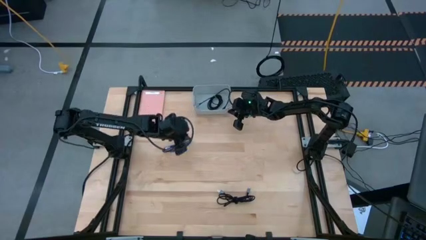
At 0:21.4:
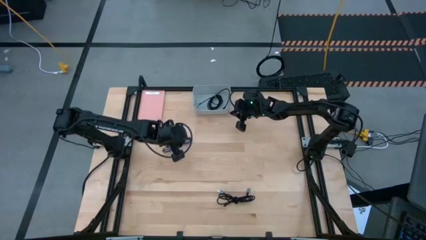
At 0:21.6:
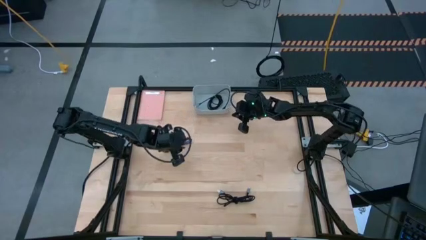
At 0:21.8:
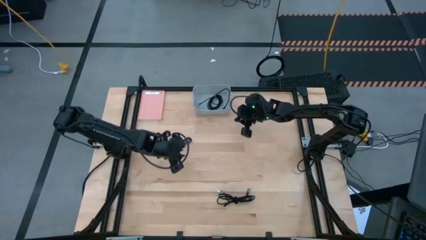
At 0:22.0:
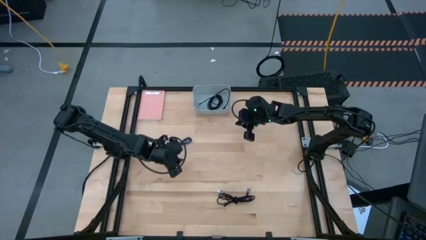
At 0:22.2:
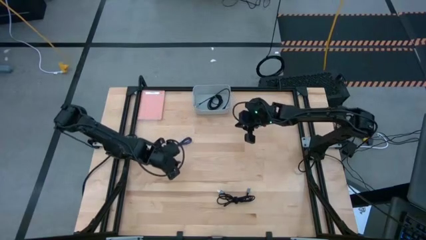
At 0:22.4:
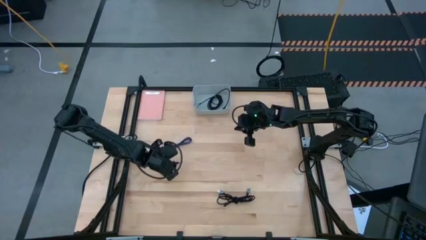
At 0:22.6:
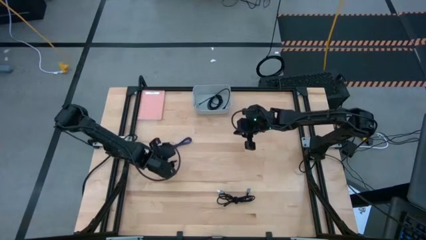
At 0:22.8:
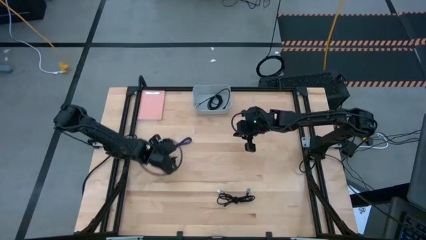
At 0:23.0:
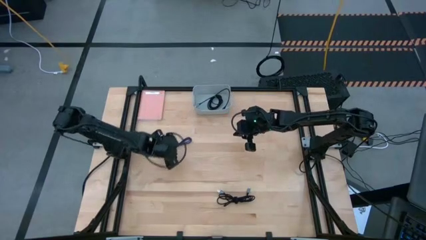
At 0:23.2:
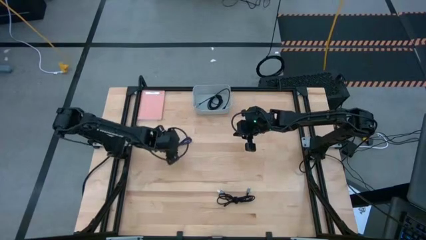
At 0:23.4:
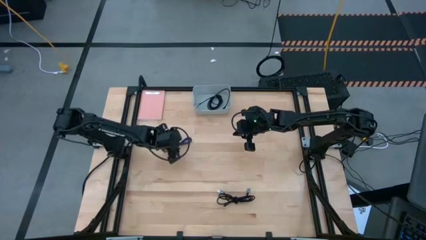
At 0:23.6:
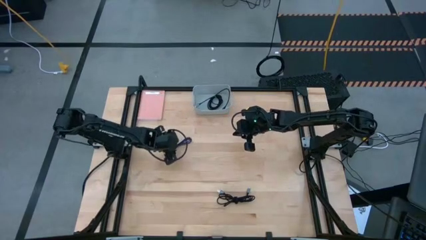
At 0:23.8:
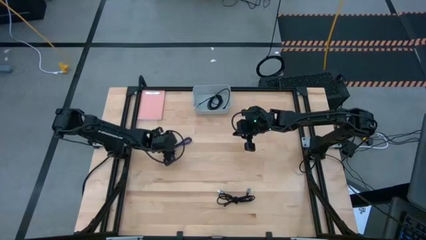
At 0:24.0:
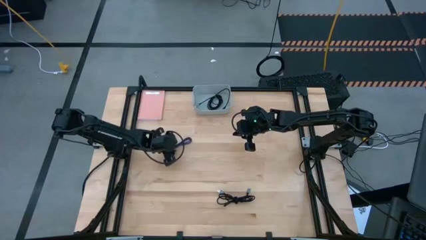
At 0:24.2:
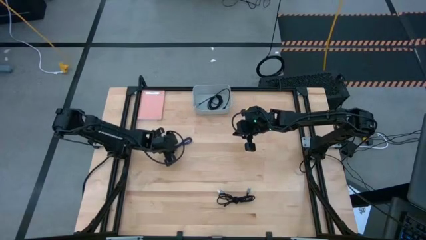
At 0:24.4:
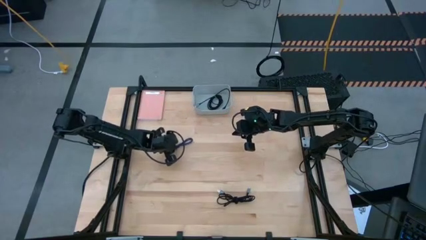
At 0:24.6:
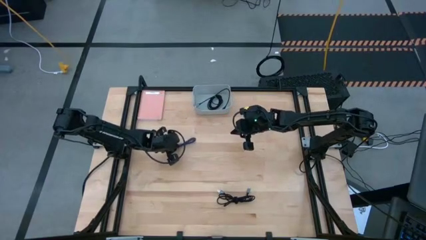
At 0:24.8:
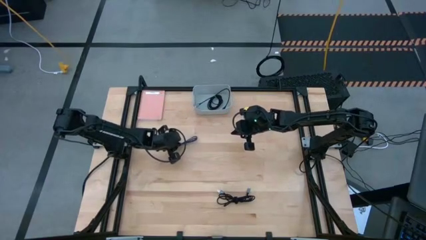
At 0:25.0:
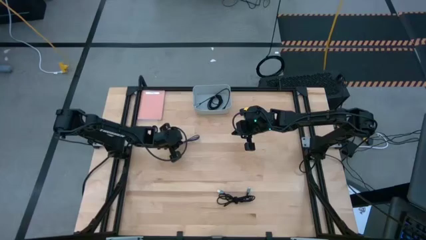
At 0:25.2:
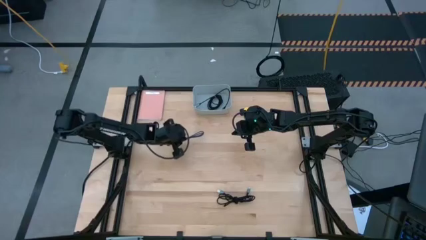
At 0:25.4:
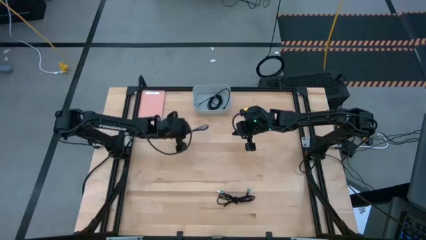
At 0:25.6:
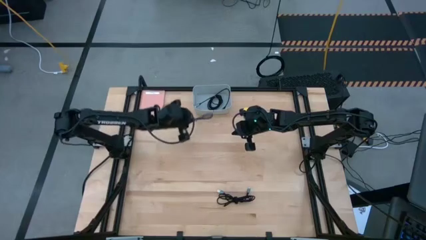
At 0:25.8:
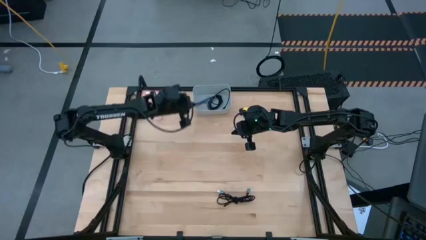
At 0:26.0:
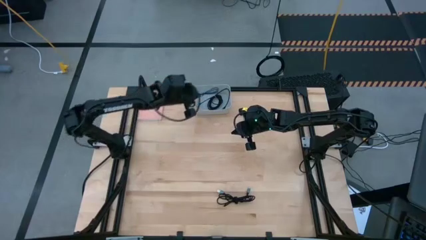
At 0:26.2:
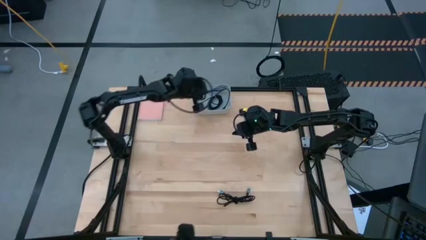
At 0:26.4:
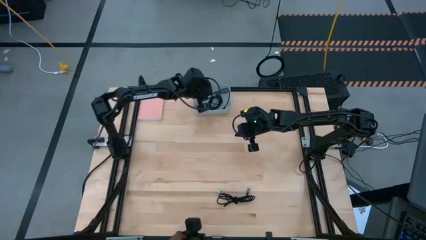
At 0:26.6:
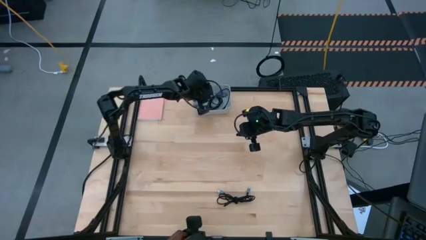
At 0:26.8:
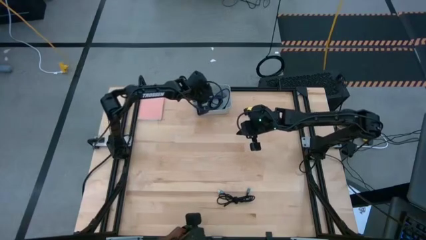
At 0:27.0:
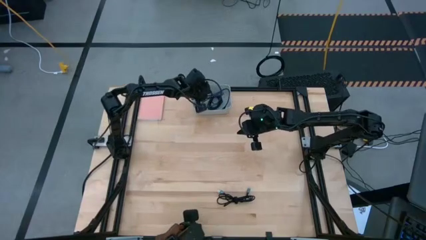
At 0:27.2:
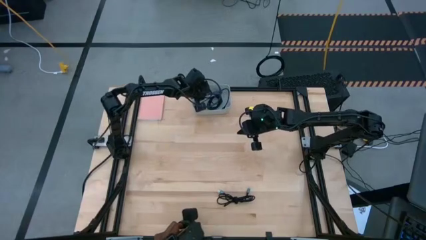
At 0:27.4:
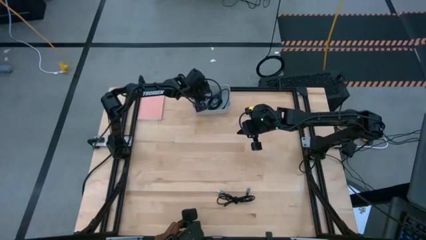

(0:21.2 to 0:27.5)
Task: Pick and place USB-C Cables
Put the purple charger cable into the gray bin

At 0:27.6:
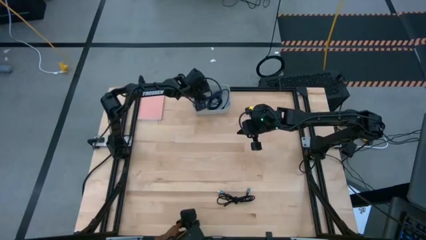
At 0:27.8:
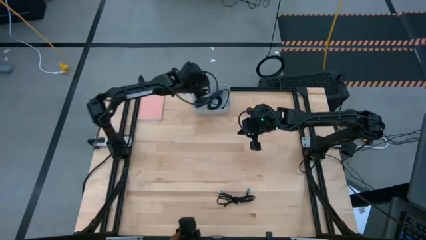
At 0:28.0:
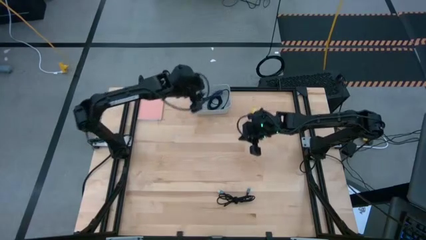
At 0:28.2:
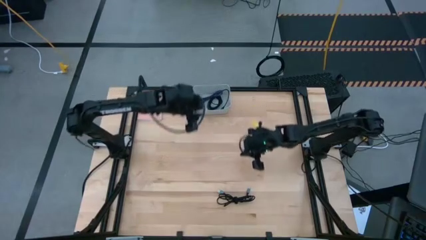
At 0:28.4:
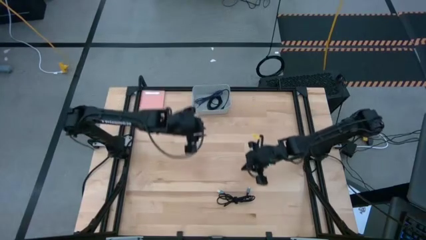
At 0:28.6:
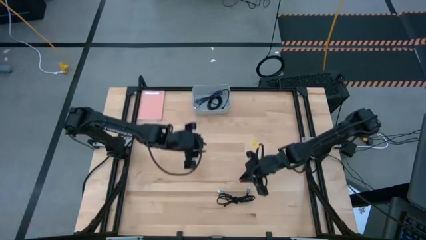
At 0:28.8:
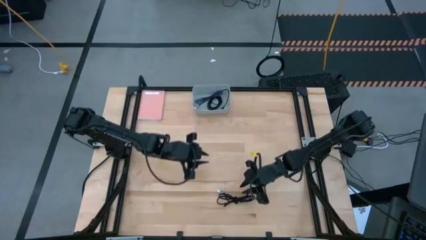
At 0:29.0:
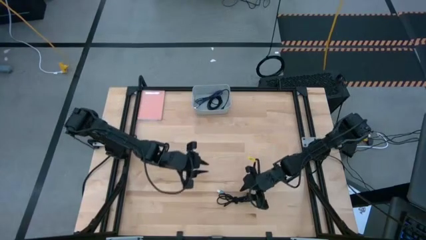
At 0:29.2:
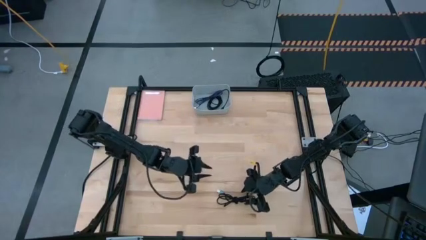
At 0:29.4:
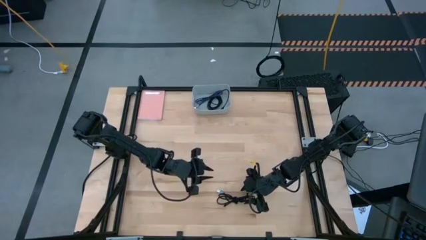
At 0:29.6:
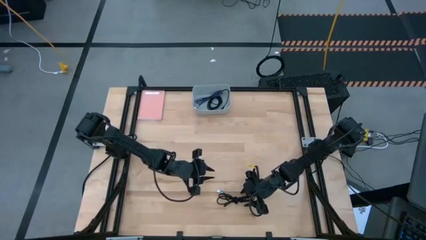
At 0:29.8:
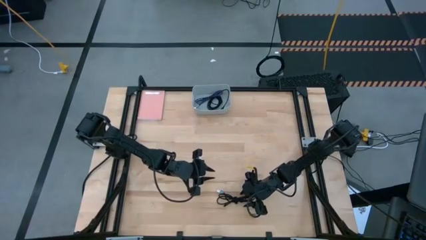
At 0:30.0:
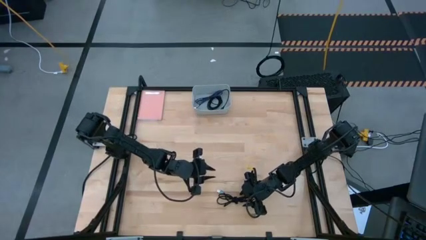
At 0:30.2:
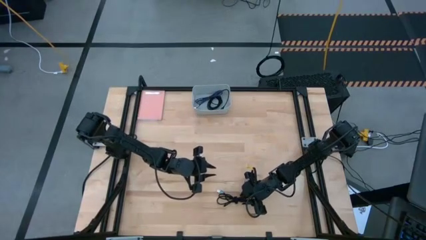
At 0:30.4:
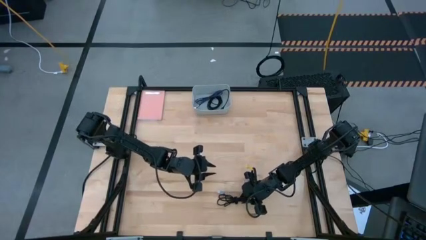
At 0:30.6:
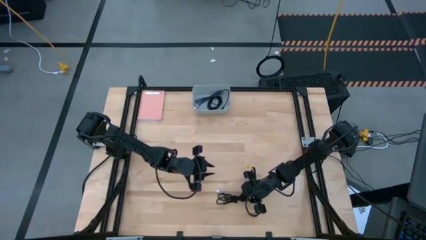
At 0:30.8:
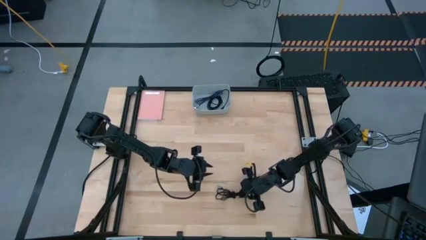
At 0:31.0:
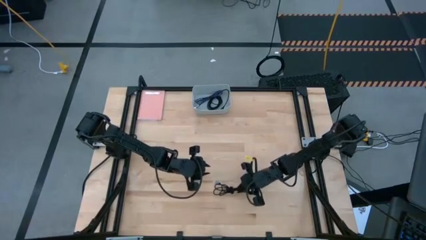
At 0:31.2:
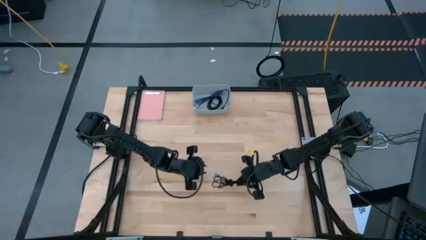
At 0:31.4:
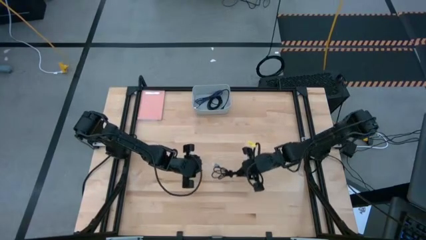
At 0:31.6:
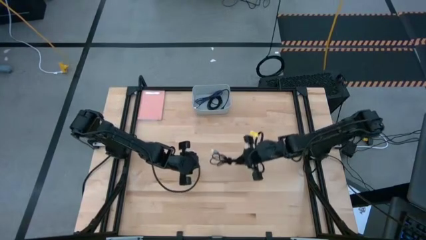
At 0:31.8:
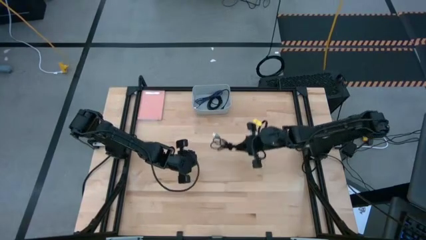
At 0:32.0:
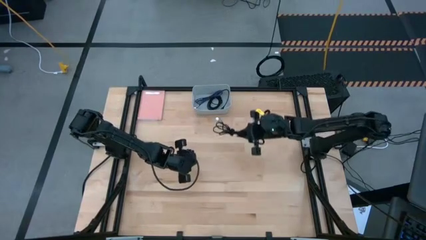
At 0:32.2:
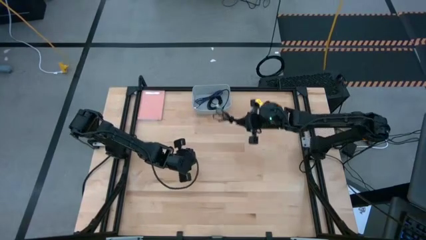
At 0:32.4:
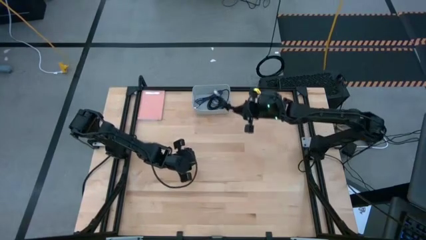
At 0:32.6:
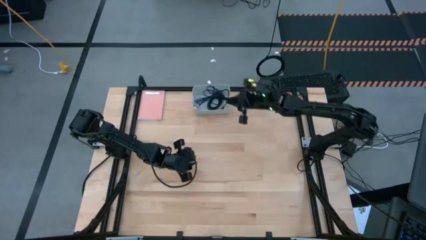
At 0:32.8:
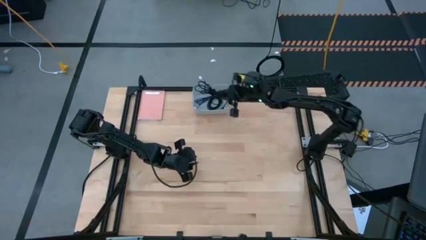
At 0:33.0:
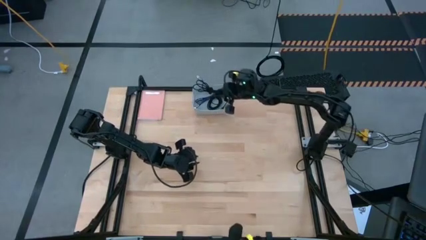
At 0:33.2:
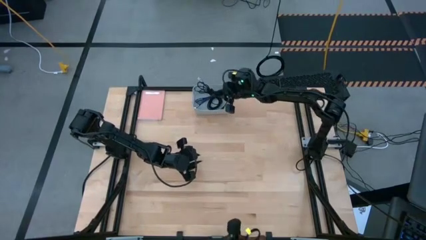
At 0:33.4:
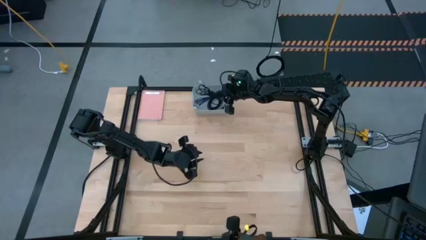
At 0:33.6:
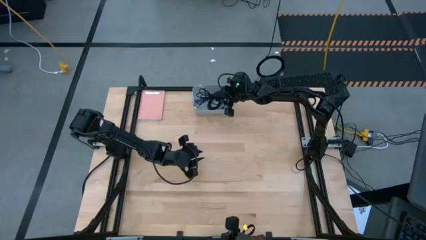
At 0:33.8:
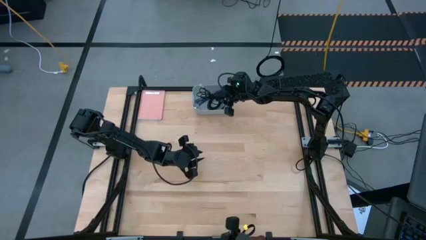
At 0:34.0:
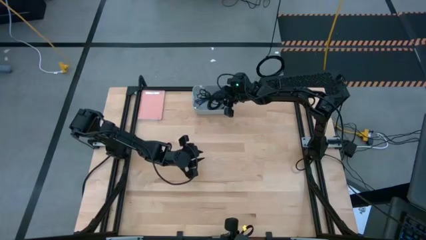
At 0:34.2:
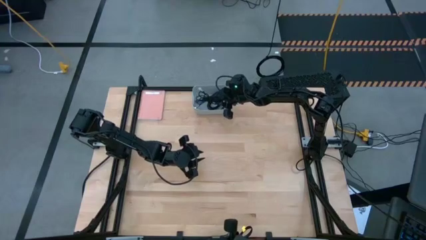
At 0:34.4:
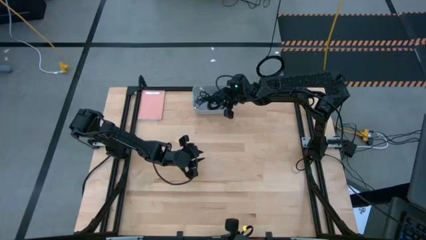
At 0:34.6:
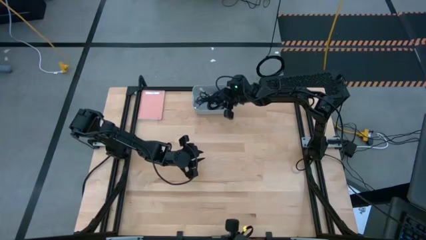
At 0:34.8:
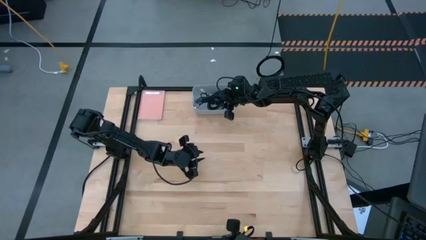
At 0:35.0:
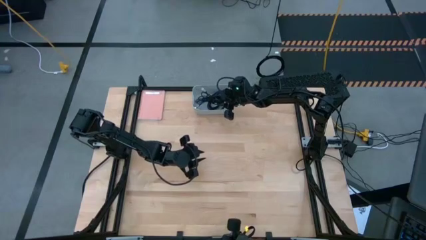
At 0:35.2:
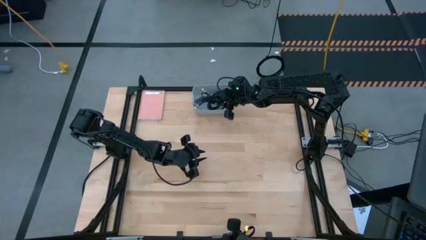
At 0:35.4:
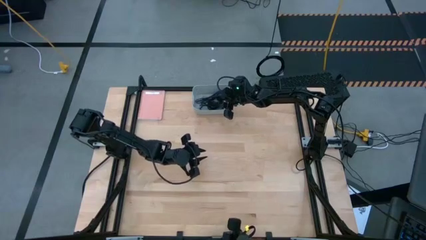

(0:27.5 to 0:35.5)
Put the black charger cable into the gray bin
